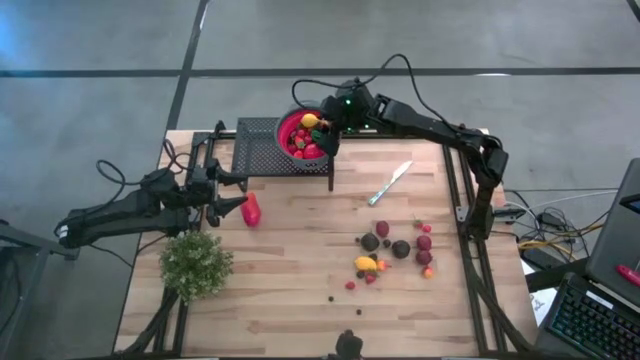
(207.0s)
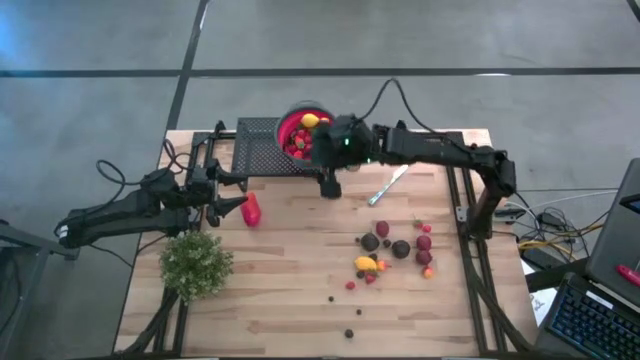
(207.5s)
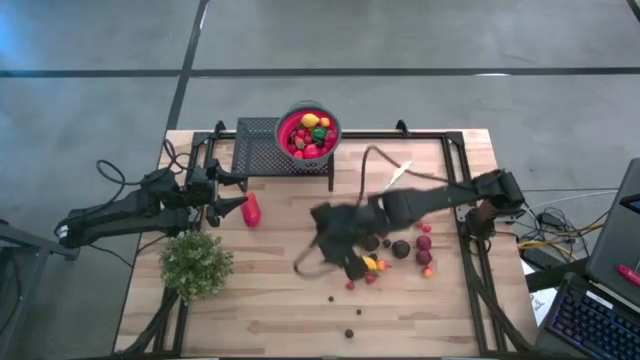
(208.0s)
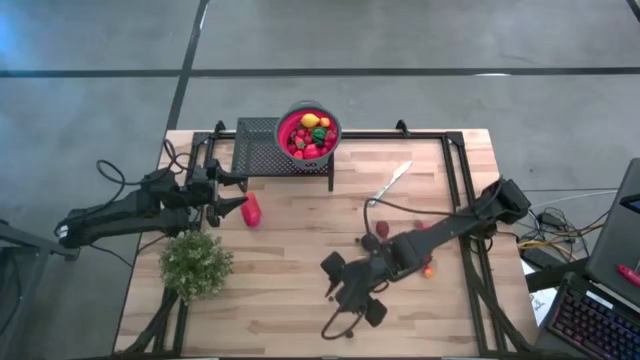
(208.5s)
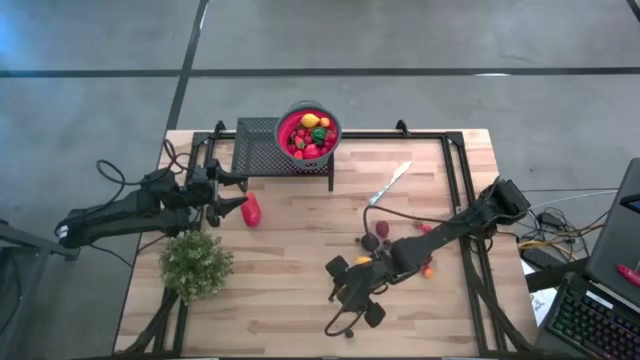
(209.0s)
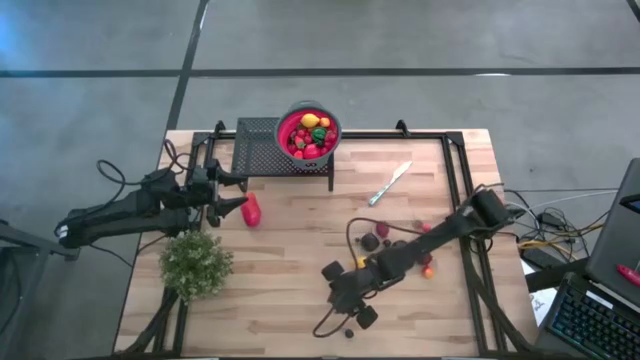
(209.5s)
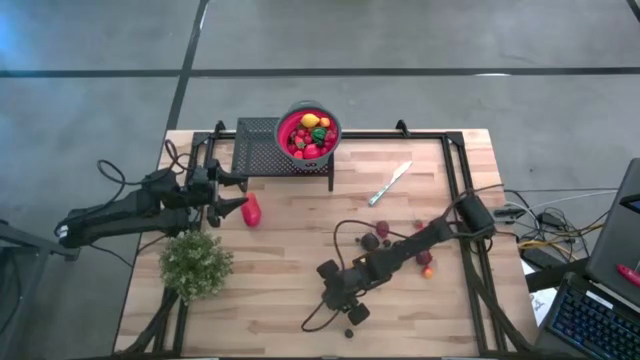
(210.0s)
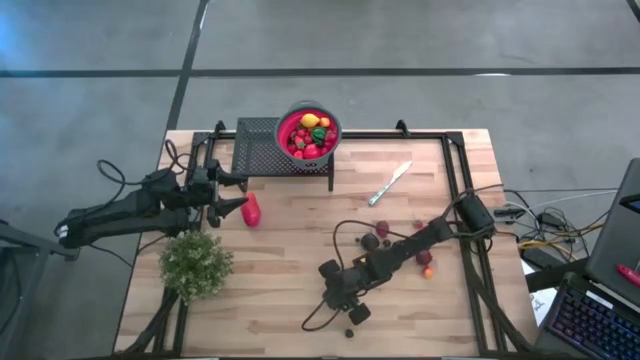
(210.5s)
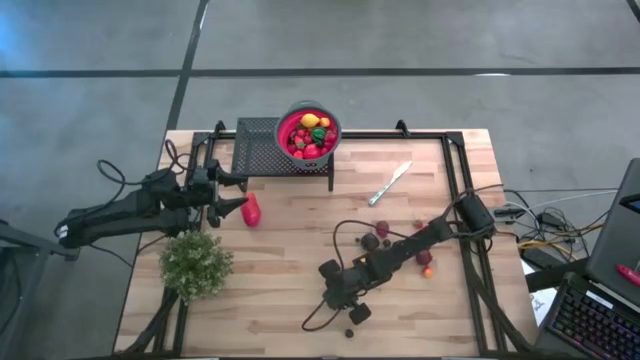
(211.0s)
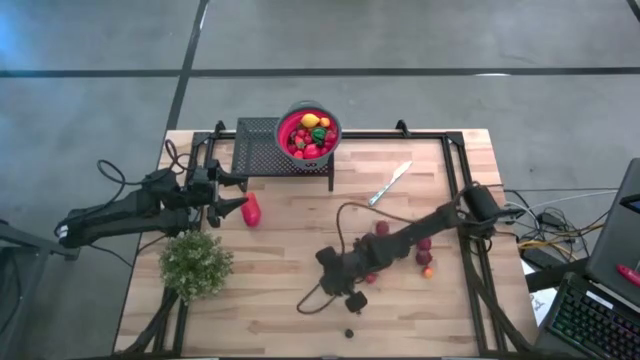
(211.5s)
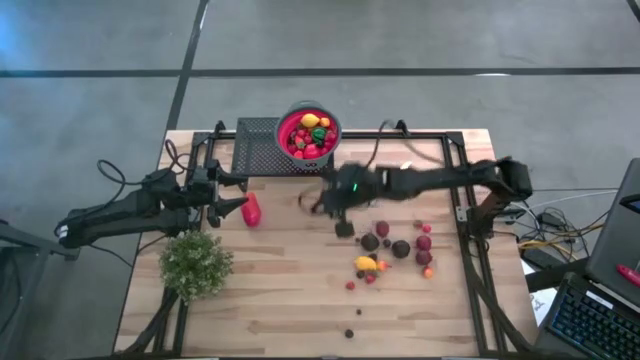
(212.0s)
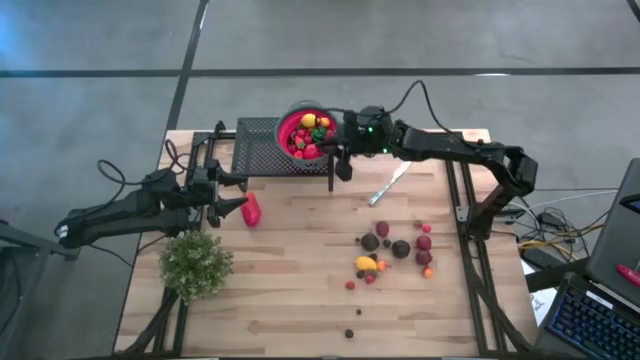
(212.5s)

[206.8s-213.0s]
Task: Pick & Place Fruit
Put the blueberry into the red gray strainer bowl on the shelf

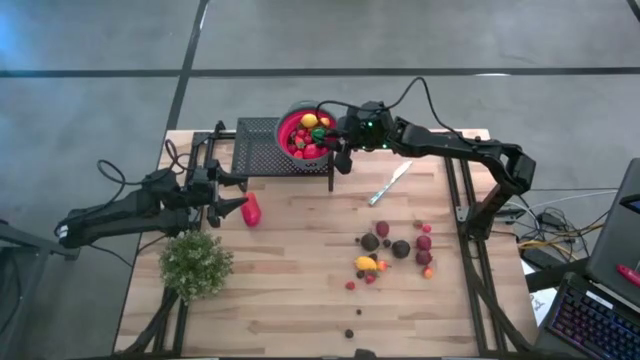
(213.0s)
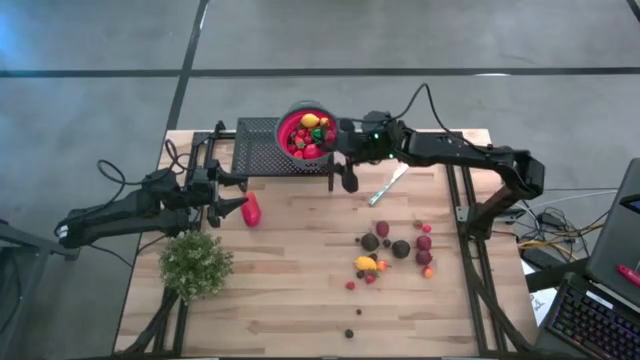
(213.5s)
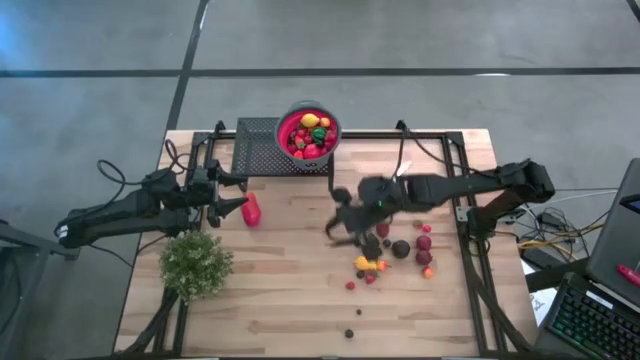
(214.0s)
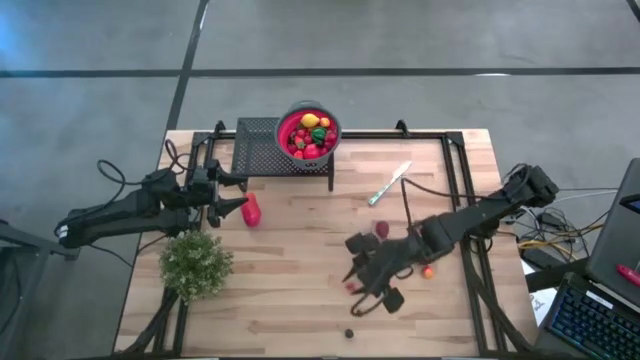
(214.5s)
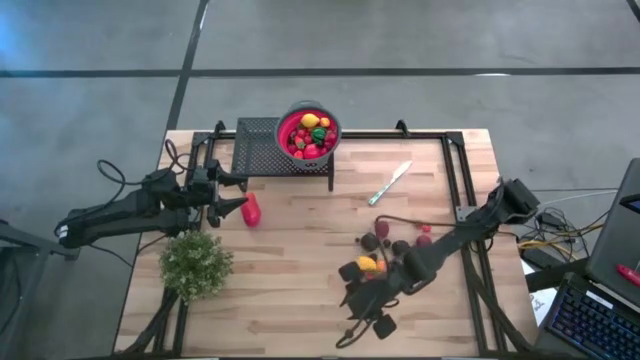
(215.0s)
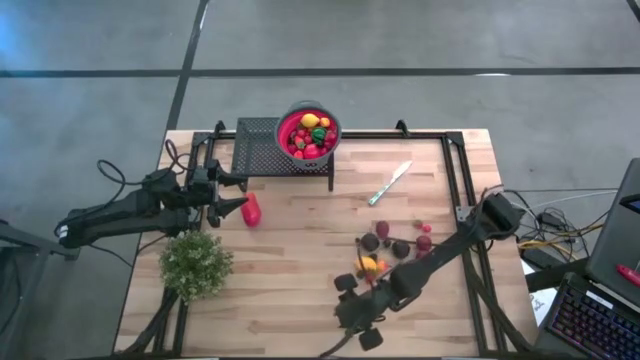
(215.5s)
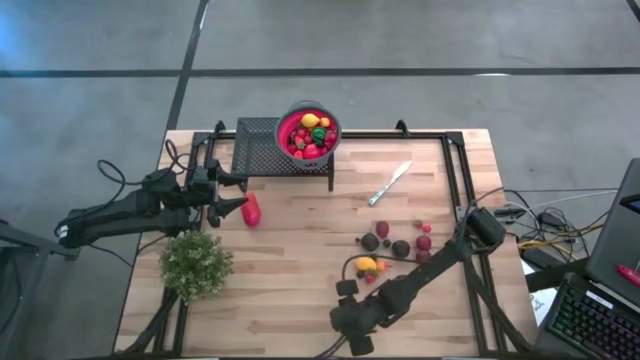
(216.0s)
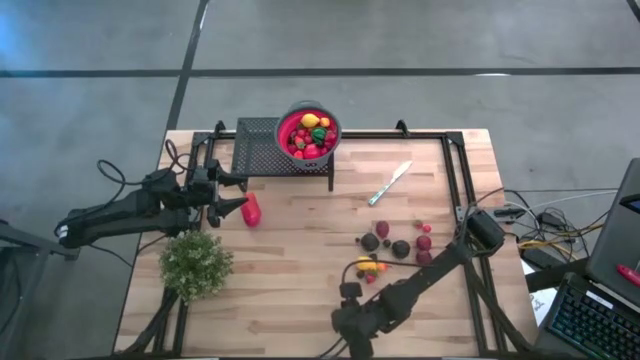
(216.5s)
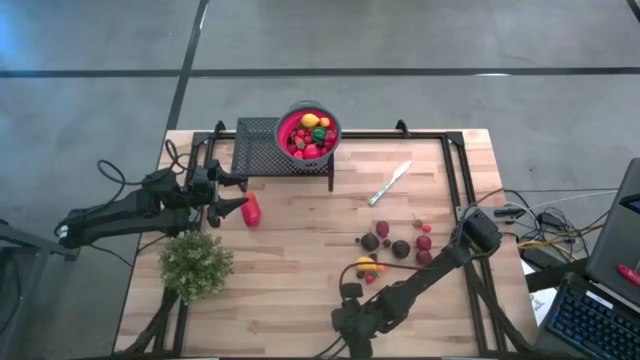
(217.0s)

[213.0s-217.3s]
Put the black cherry into the red gray strainer bowl on the shelf

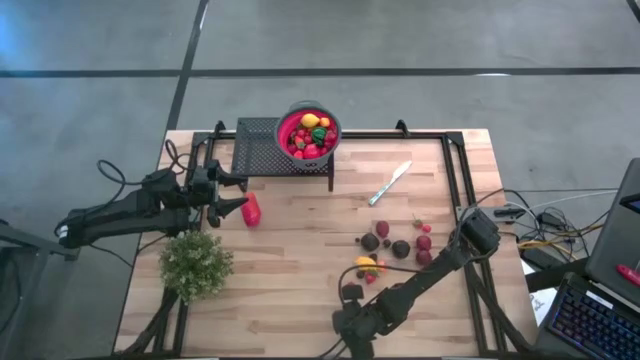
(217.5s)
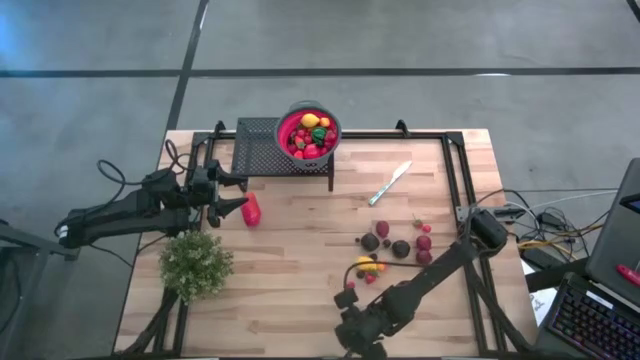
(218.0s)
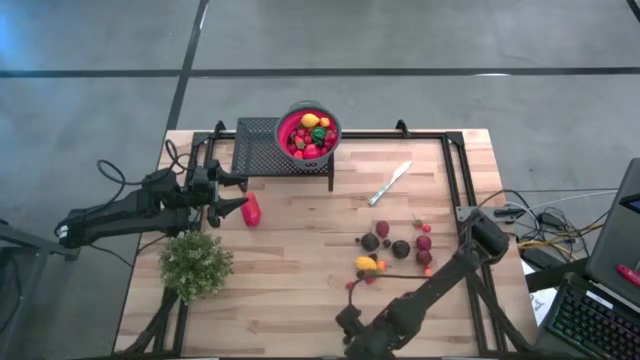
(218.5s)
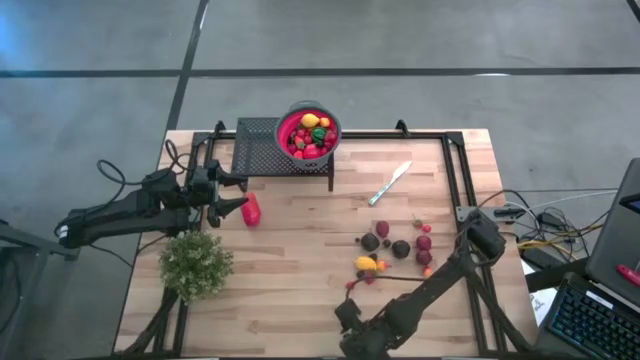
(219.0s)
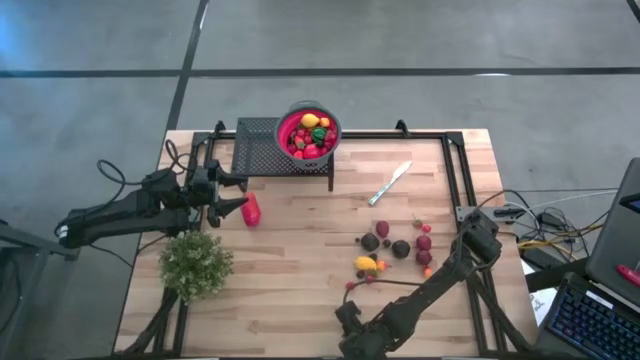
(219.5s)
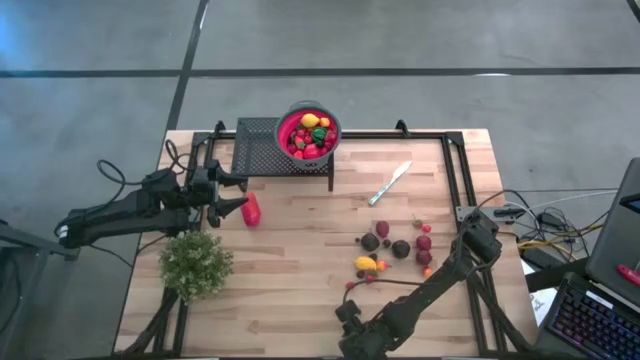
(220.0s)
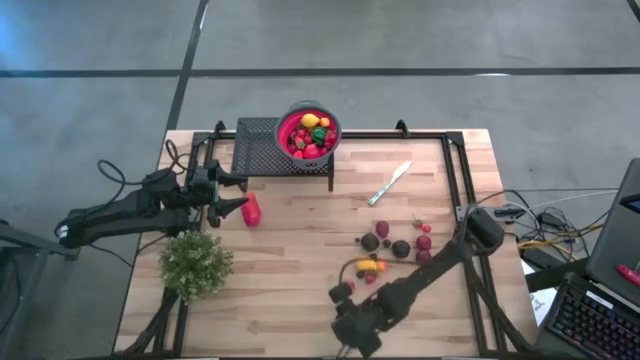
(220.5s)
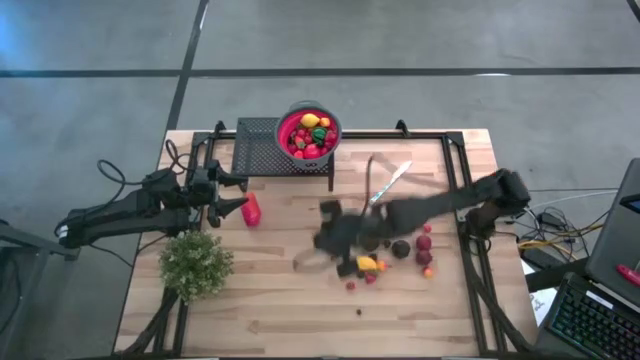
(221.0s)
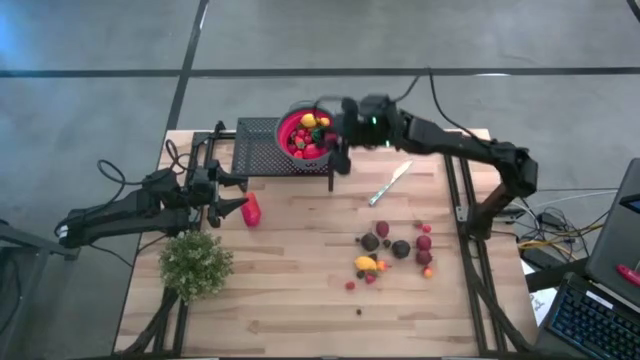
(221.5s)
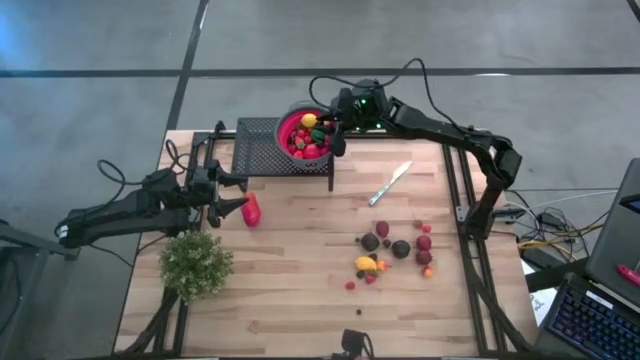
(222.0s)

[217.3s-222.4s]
Put the black cherry into the red gray strainer bowl on the shelf

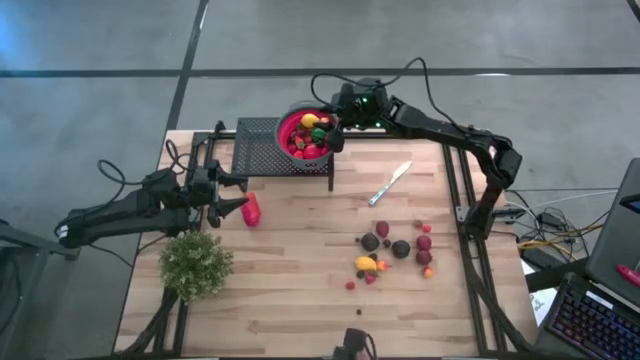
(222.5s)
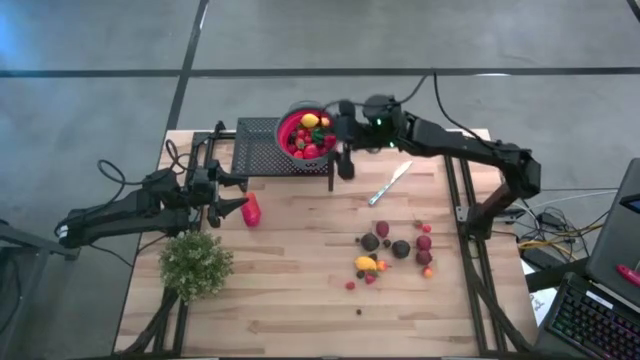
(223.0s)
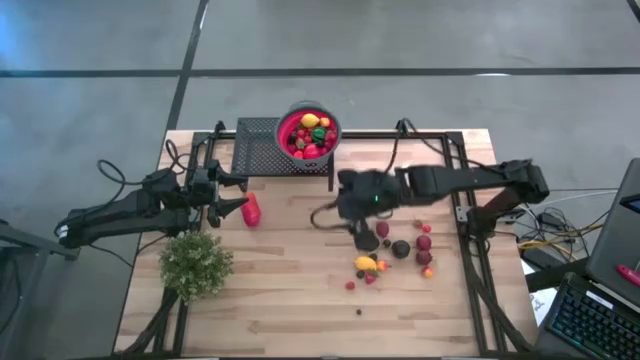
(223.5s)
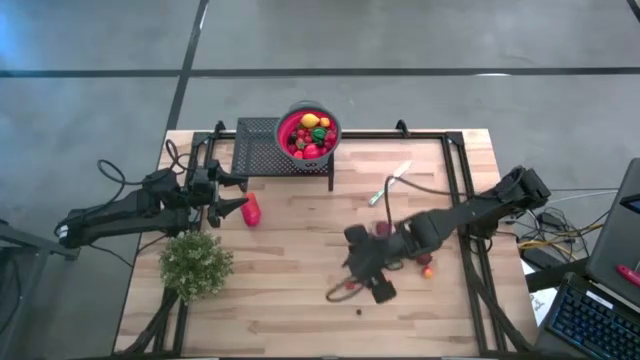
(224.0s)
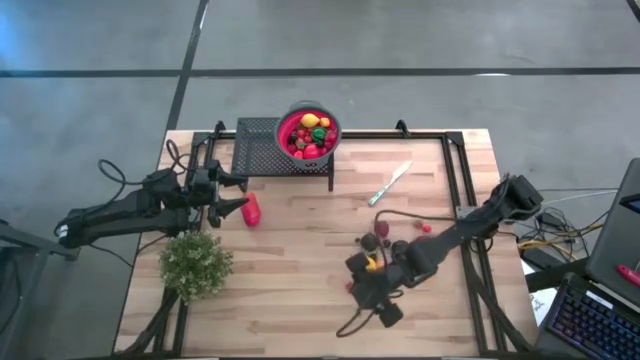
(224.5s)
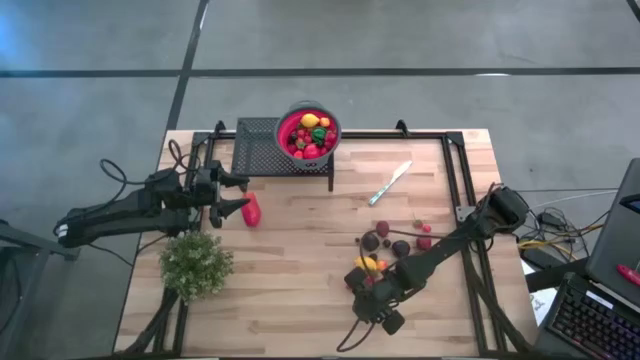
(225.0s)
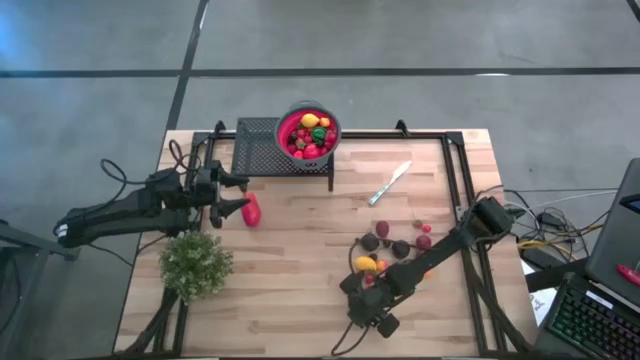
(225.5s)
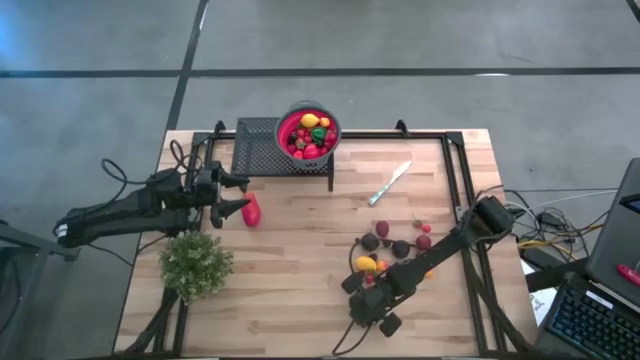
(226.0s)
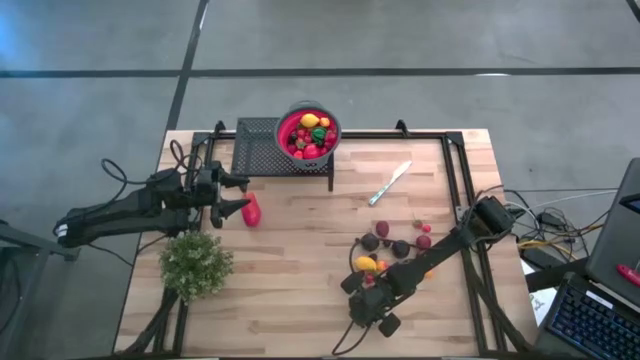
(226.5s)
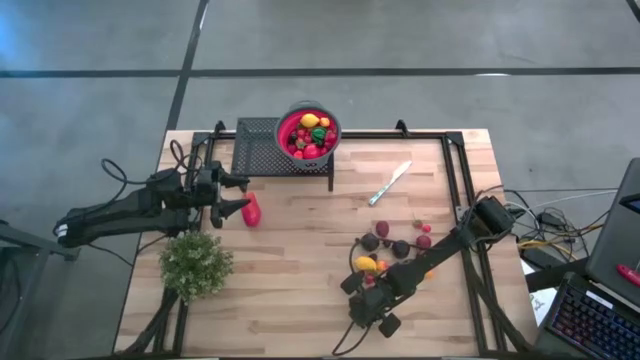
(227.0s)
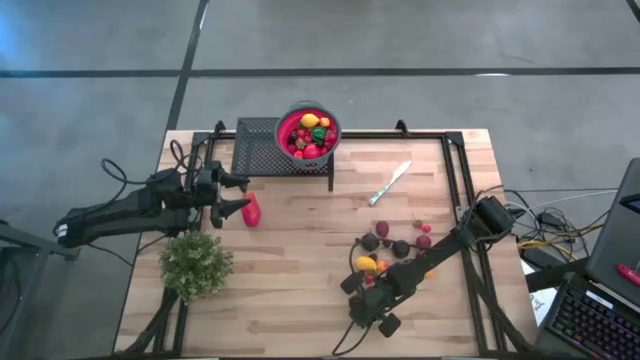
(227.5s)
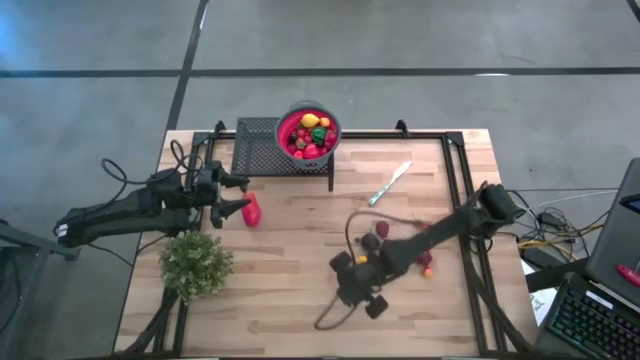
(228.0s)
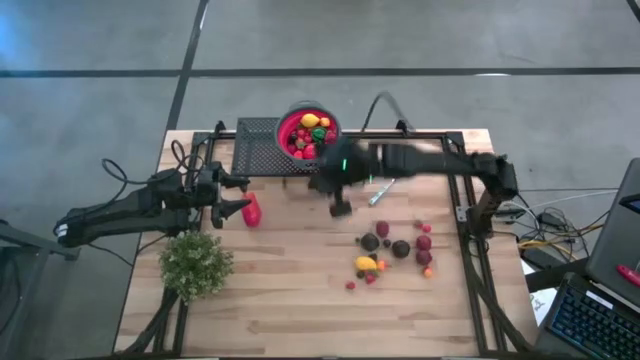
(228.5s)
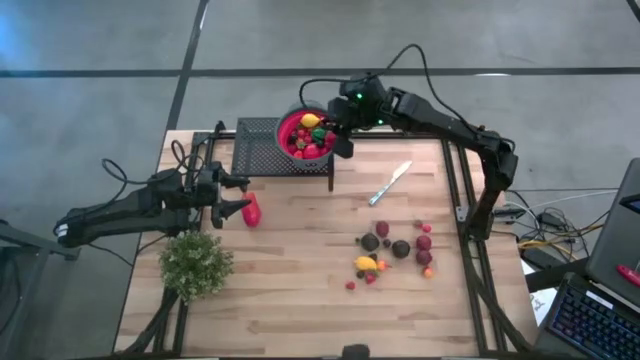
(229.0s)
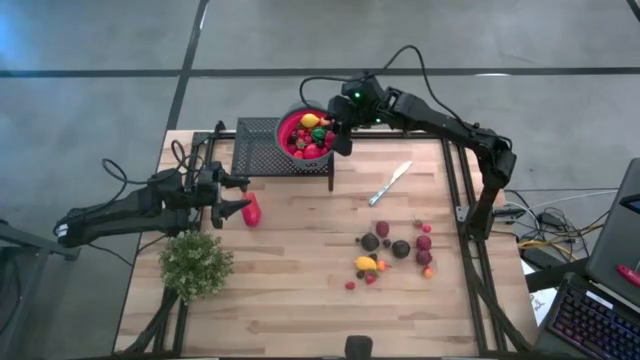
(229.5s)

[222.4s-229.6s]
Put the blueberry into the red gray strainer bowl on the shelf
